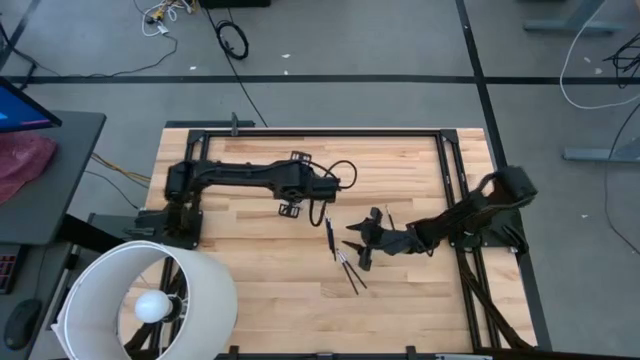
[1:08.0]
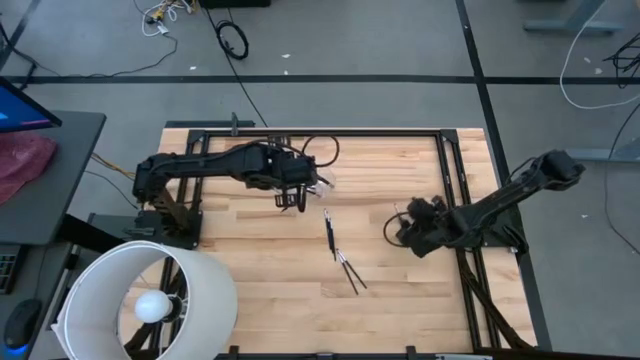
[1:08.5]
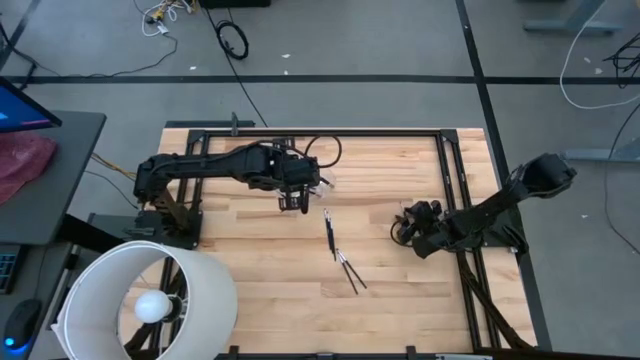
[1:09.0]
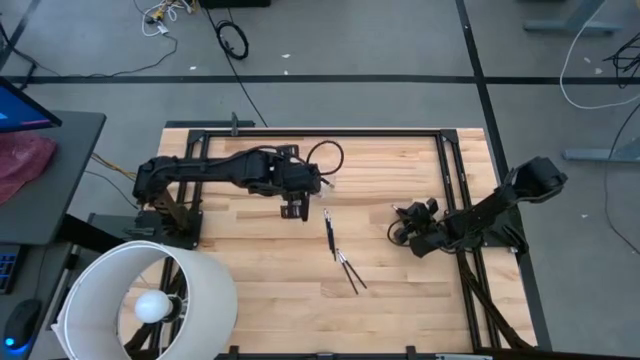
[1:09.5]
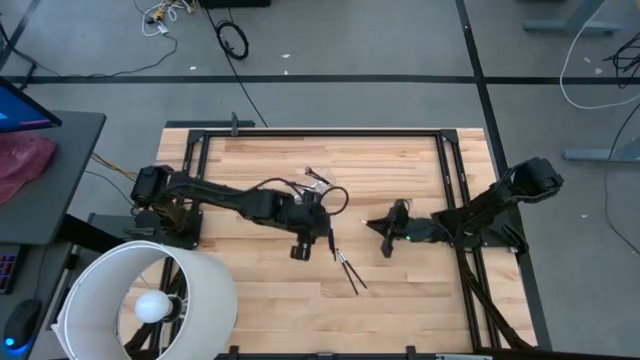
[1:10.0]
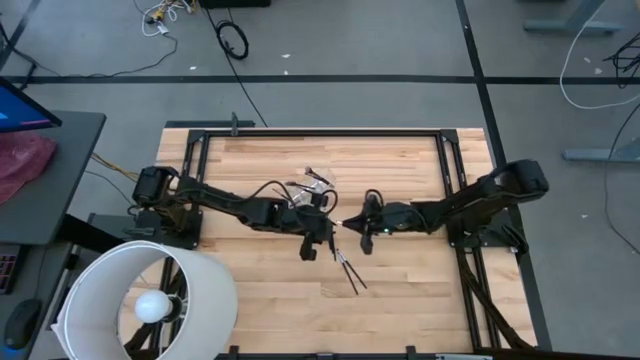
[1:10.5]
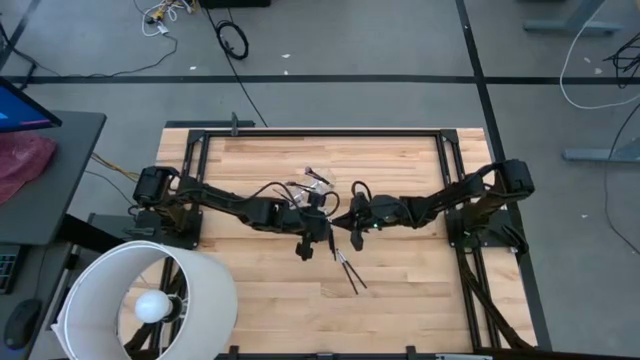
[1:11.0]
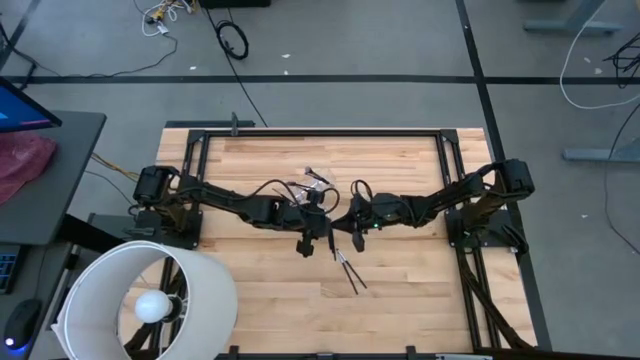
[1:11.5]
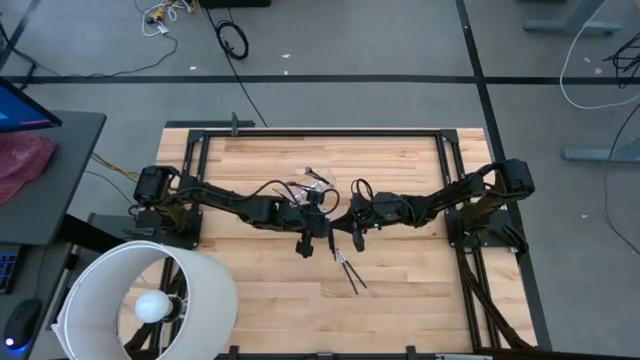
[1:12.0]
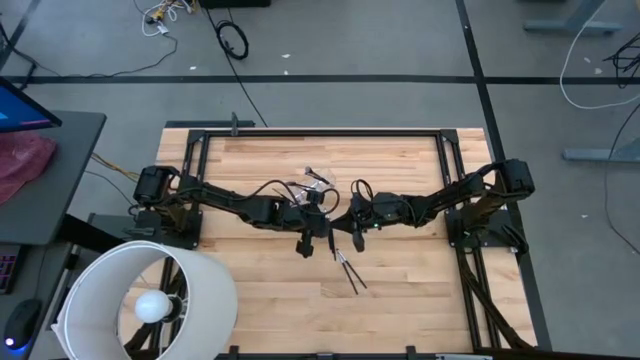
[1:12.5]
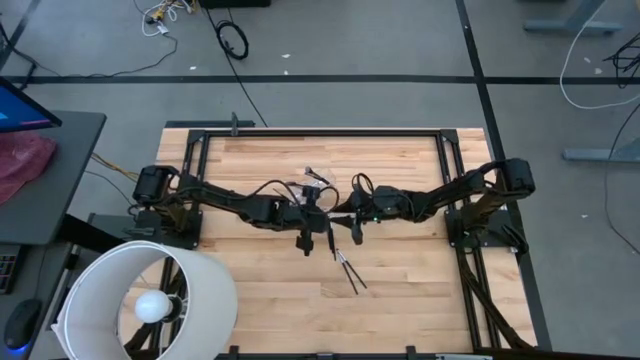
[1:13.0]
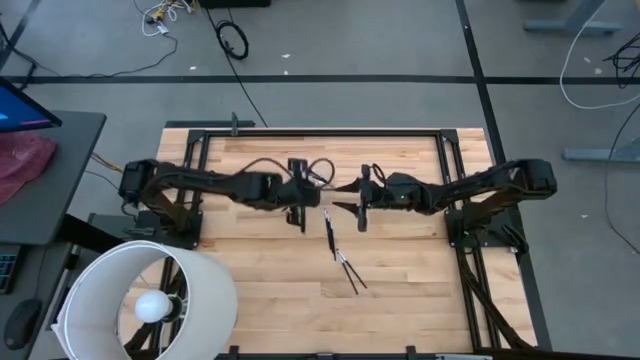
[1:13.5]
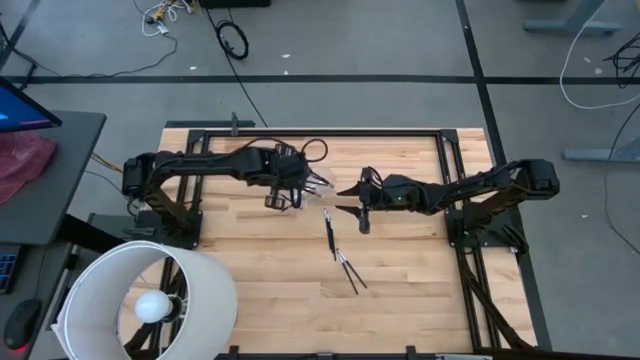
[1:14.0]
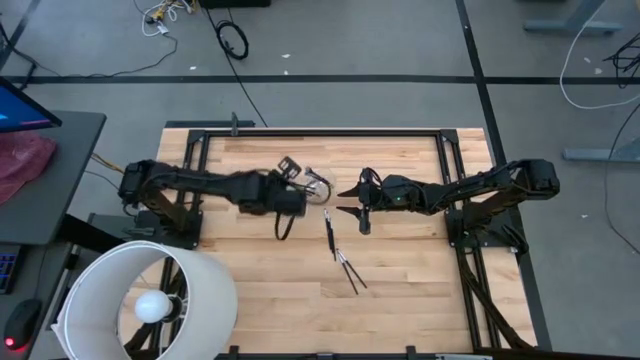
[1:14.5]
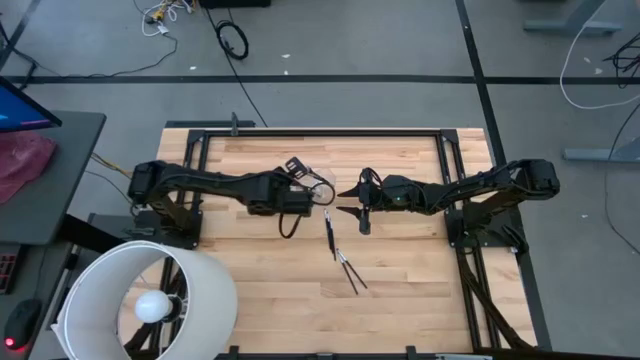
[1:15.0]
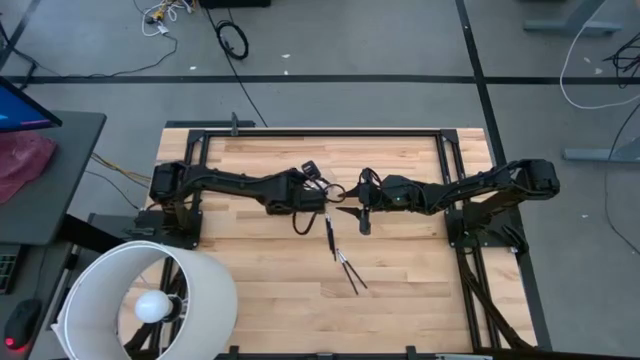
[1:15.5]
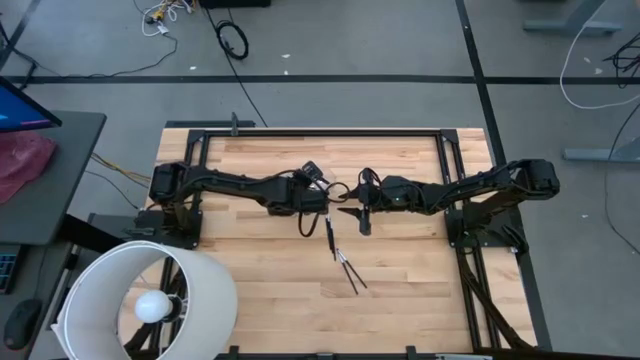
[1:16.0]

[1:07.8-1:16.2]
Task: Put items in baskets/containers
Put the black eyeshadow brush into the transparent organizer

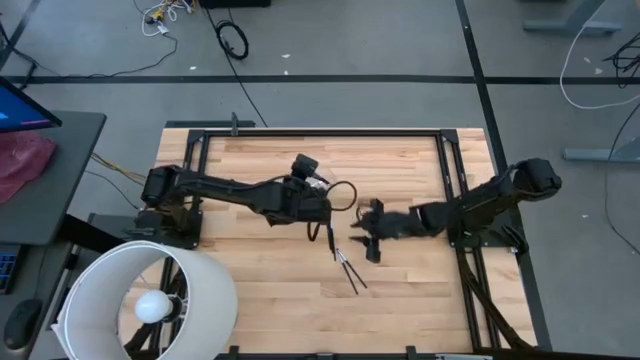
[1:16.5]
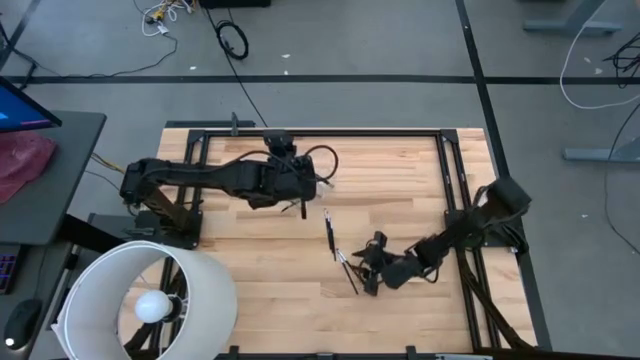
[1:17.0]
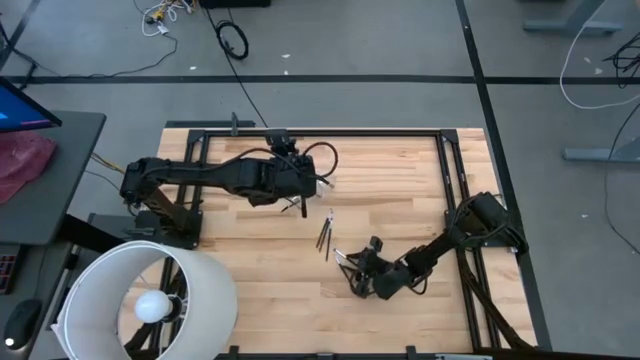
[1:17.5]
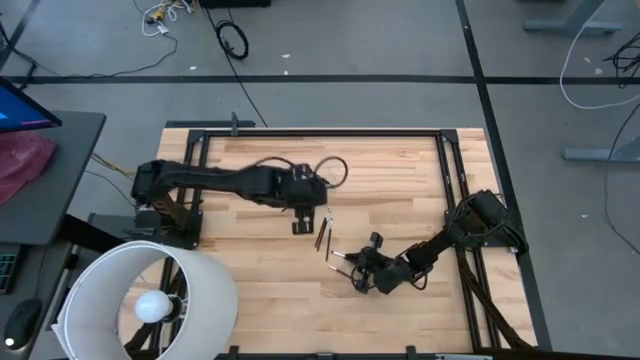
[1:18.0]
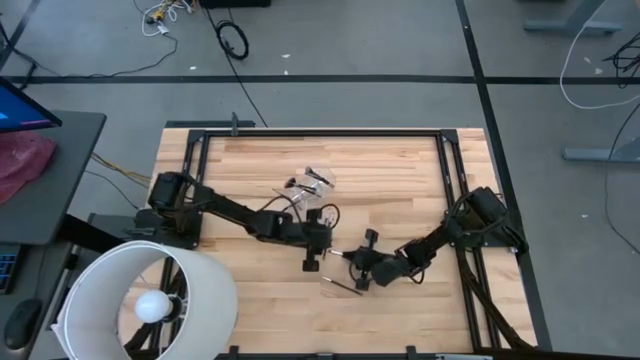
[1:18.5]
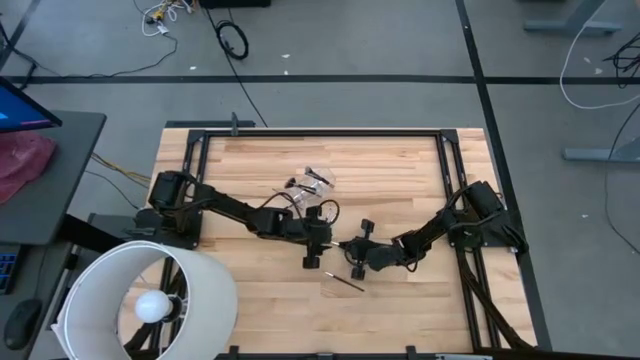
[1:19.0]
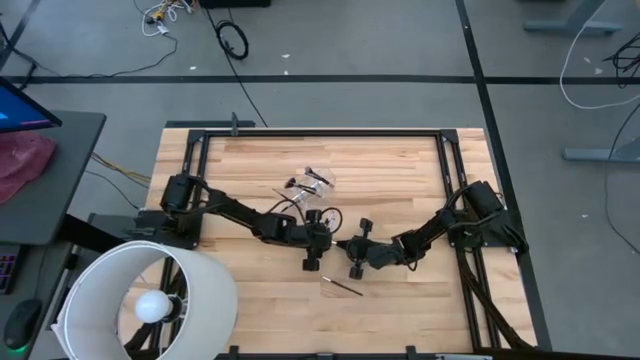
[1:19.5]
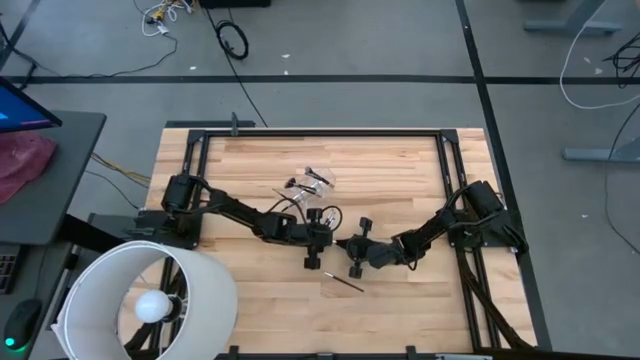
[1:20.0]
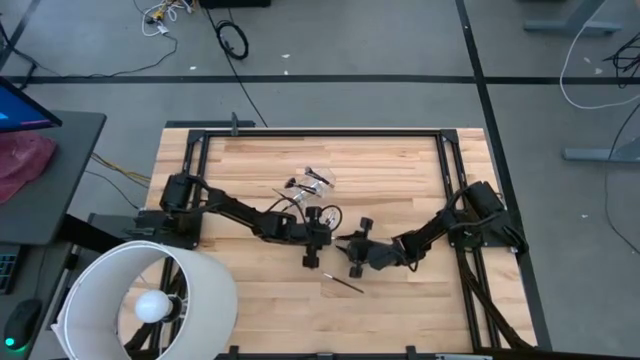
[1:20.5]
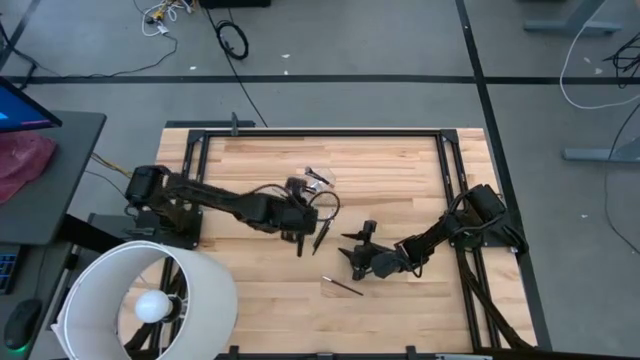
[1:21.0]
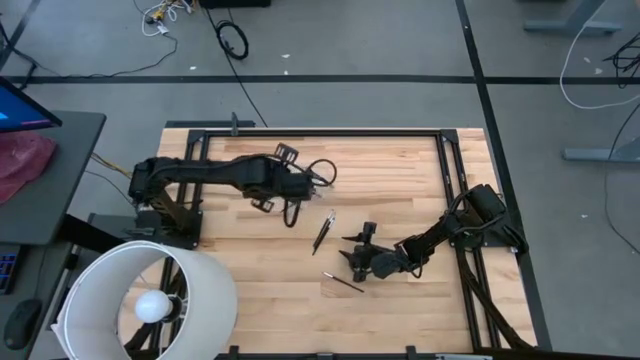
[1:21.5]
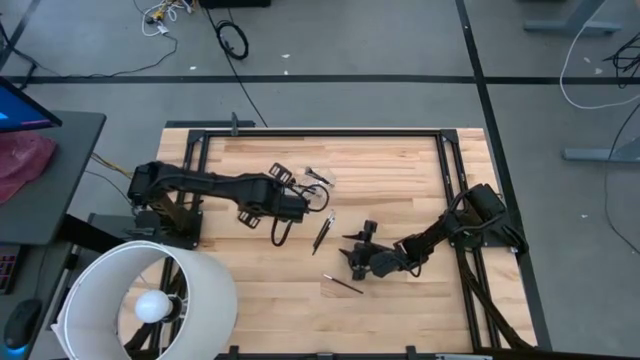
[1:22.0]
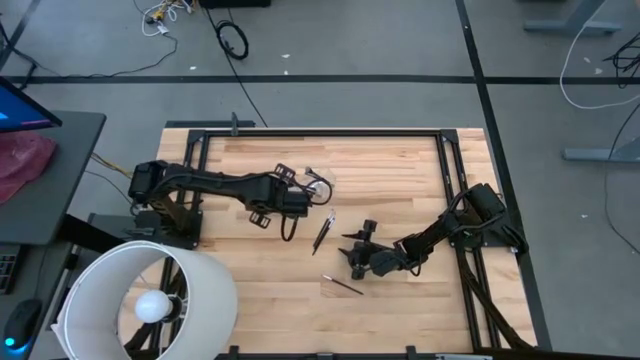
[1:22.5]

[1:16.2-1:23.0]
Put the black eyeshadow brush into the transparent organizer

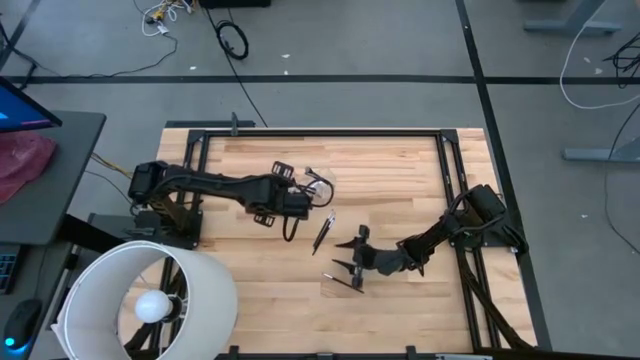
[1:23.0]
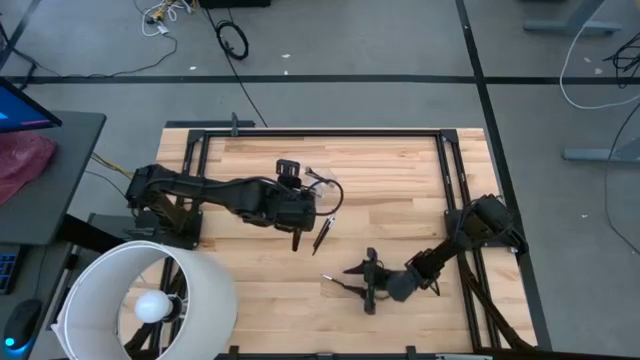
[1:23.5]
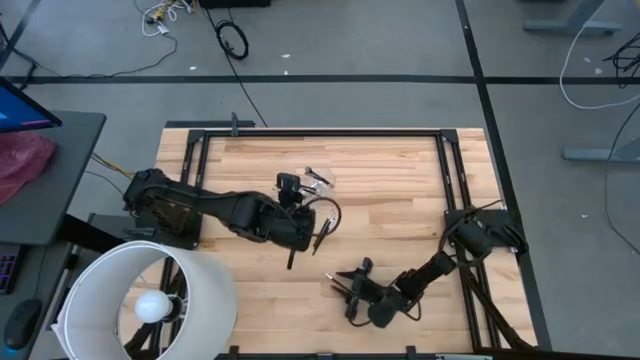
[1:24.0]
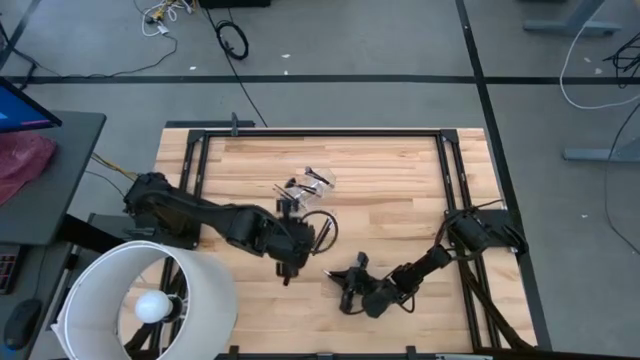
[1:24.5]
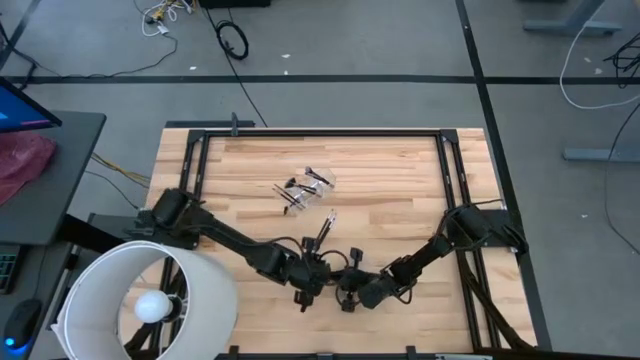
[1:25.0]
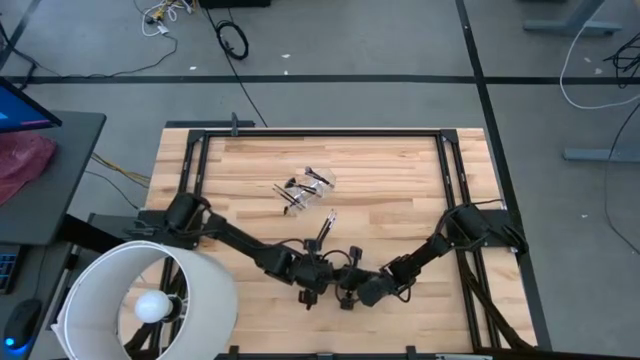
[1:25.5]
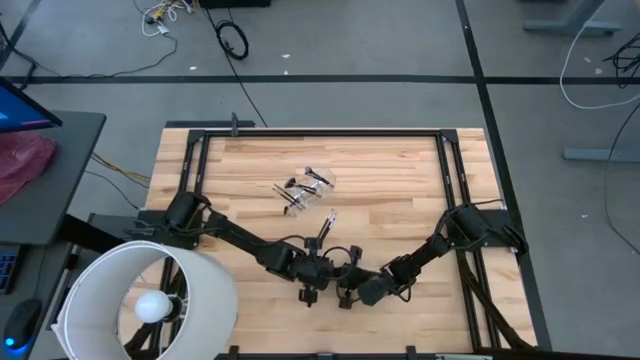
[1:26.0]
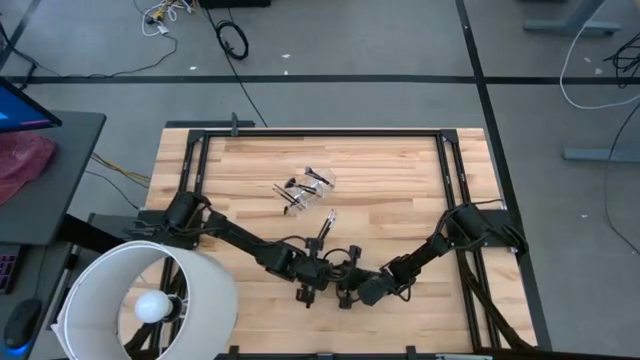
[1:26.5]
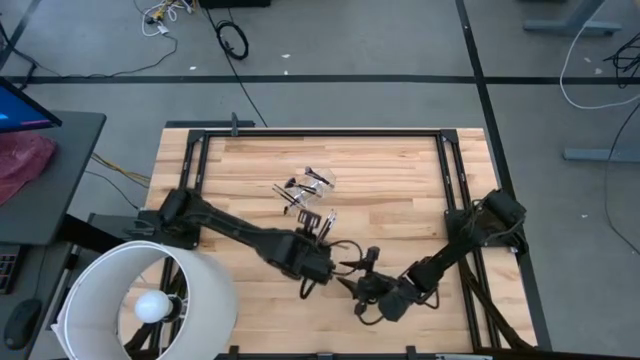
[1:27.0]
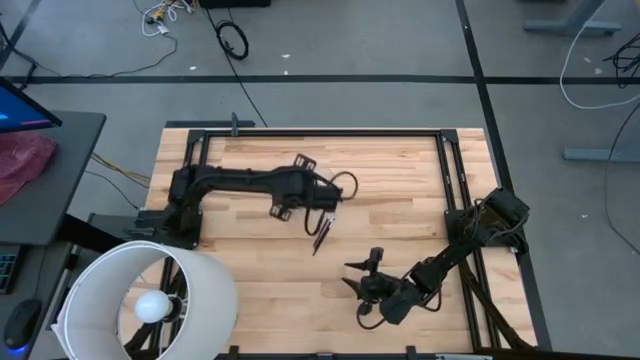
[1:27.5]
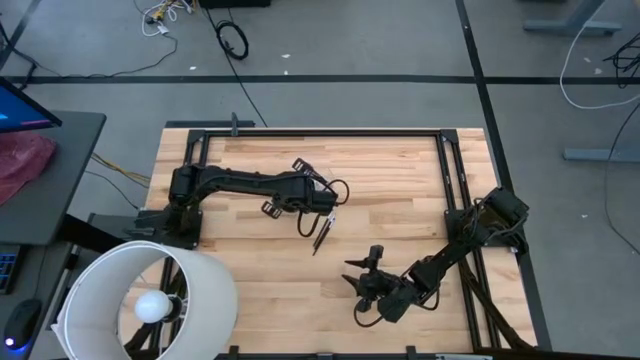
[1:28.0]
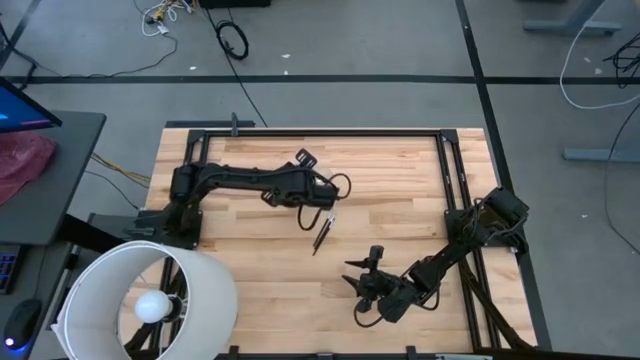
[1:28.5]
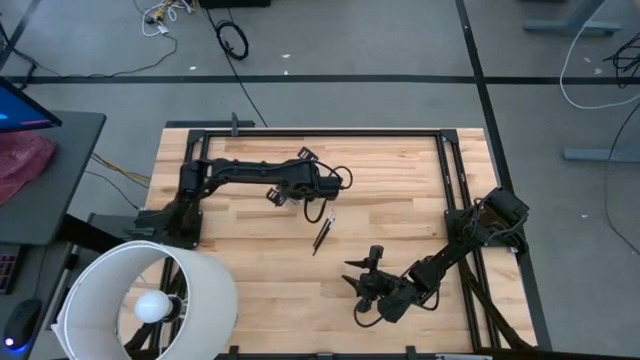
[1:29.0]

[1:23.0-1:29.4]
Put the black liner brush into the transparent organizer
